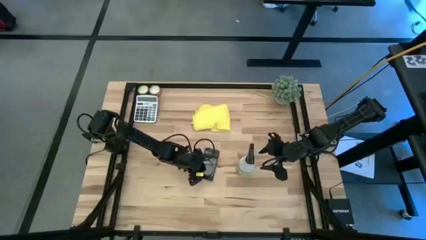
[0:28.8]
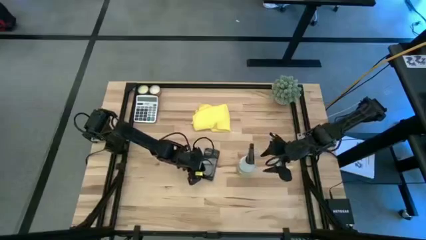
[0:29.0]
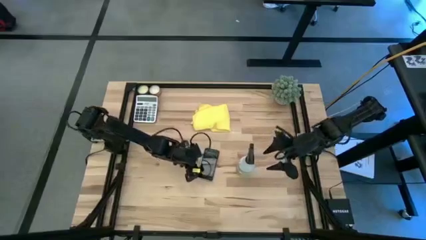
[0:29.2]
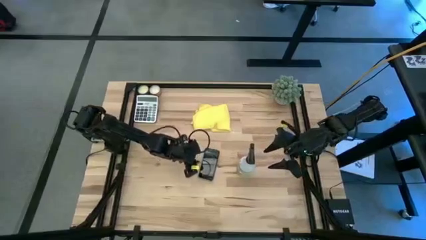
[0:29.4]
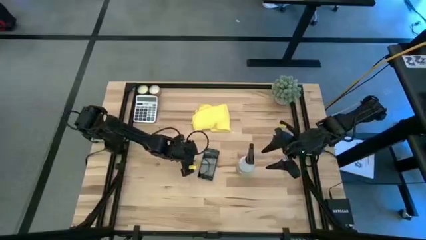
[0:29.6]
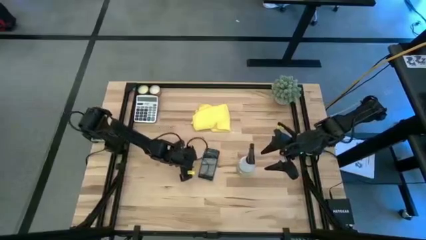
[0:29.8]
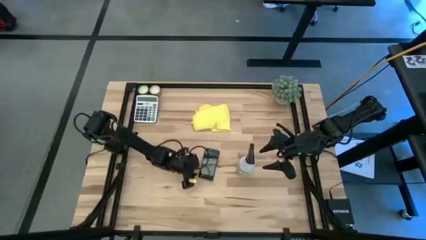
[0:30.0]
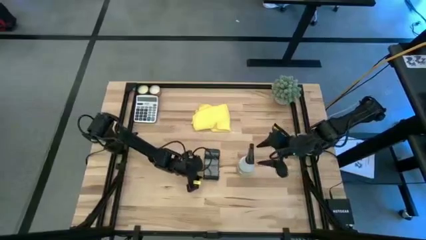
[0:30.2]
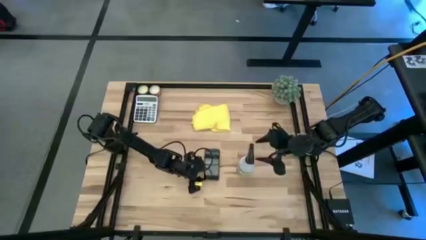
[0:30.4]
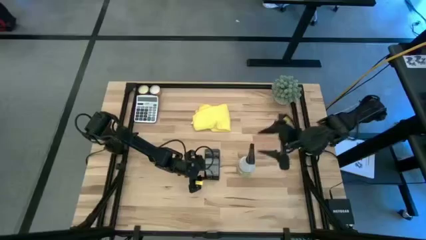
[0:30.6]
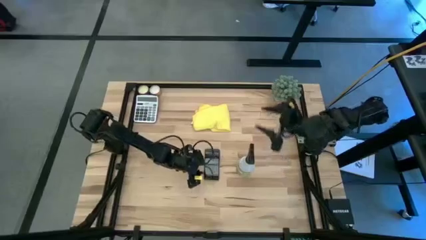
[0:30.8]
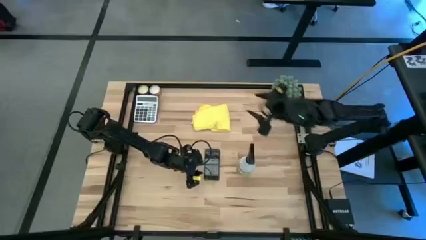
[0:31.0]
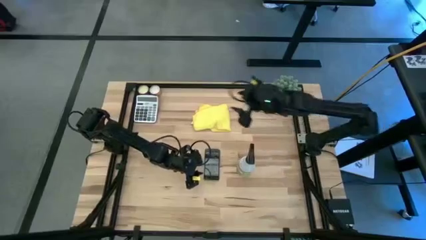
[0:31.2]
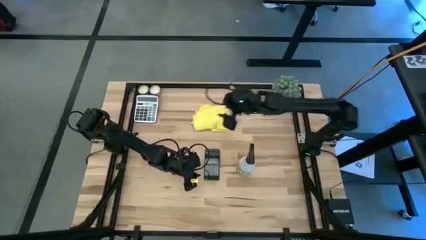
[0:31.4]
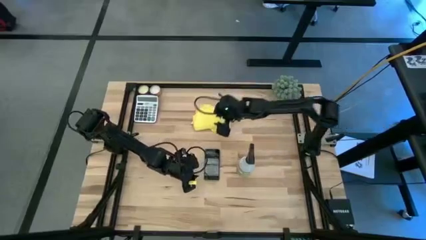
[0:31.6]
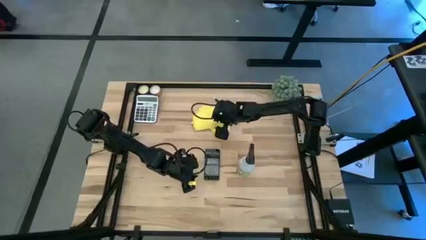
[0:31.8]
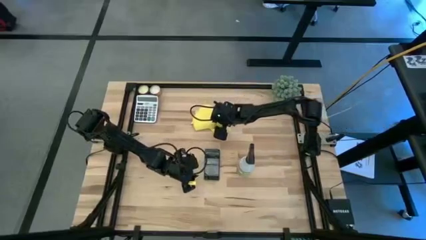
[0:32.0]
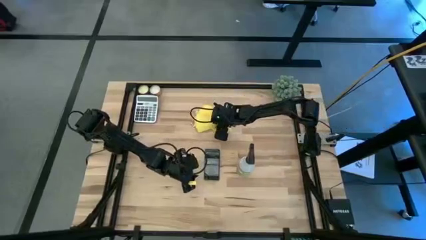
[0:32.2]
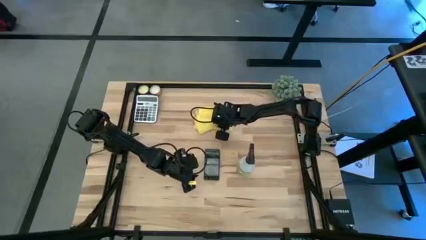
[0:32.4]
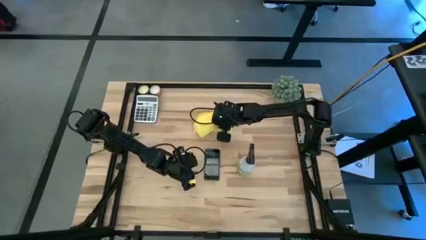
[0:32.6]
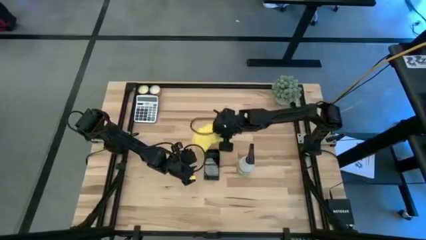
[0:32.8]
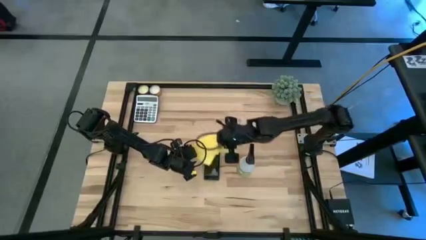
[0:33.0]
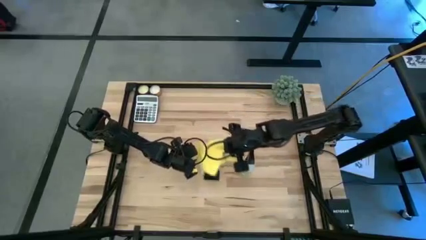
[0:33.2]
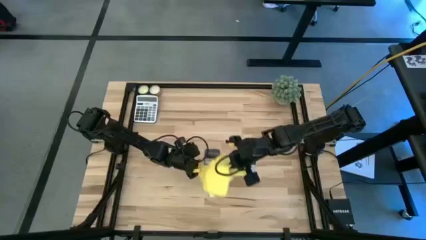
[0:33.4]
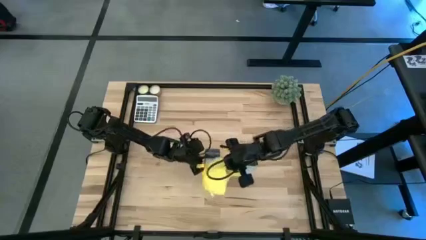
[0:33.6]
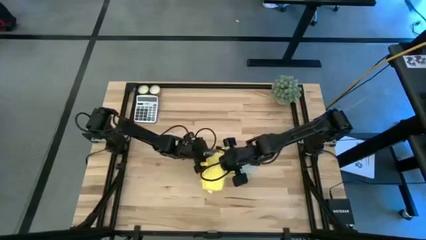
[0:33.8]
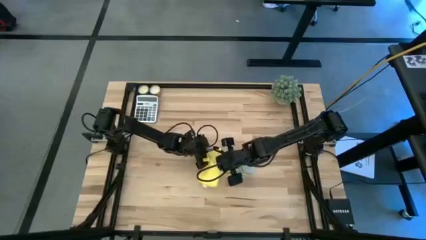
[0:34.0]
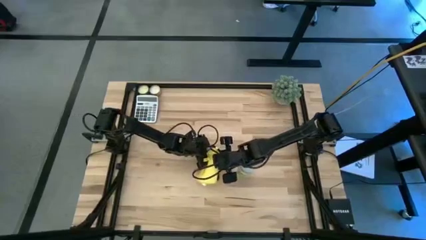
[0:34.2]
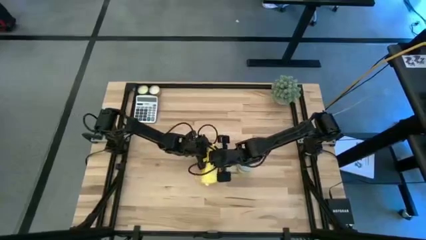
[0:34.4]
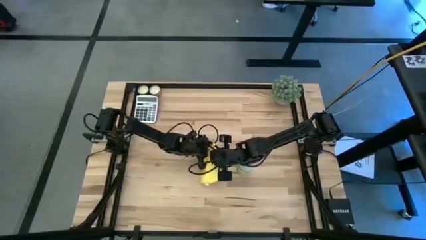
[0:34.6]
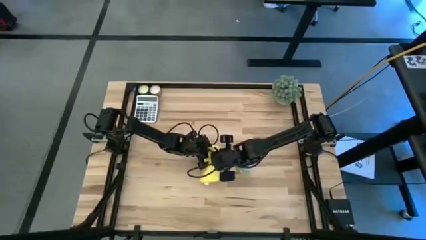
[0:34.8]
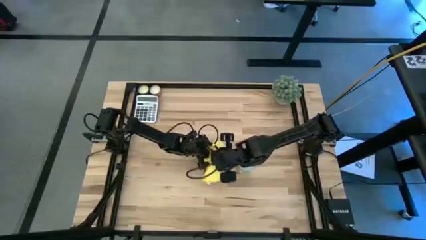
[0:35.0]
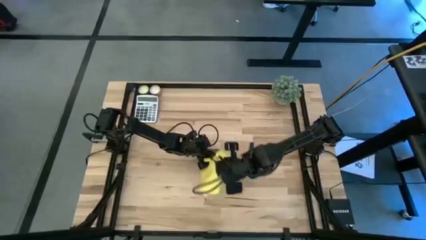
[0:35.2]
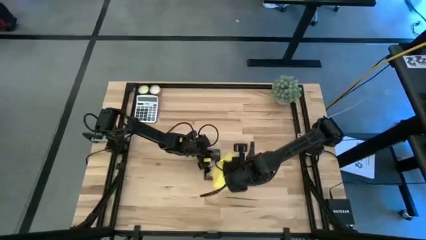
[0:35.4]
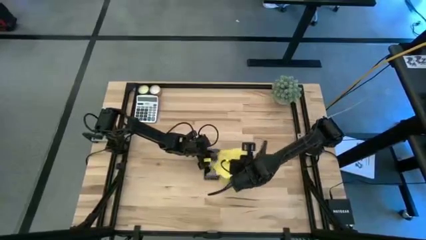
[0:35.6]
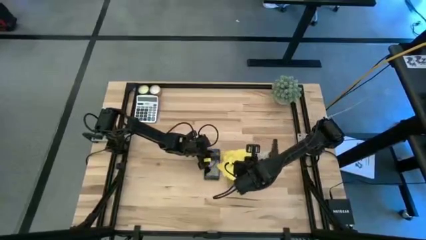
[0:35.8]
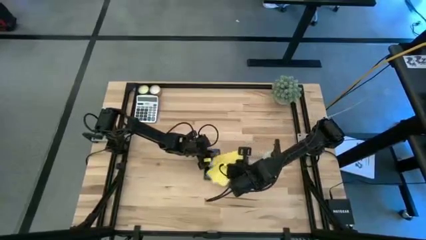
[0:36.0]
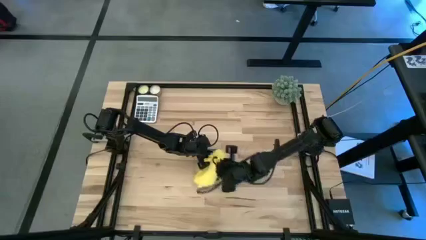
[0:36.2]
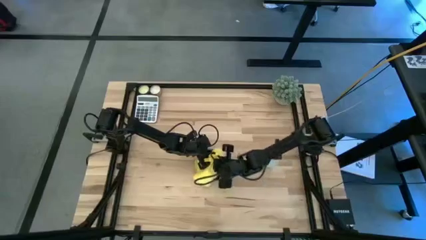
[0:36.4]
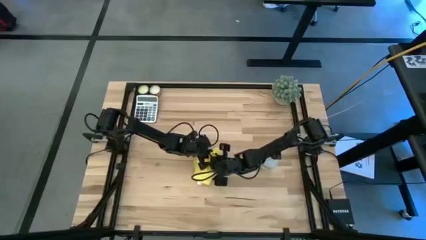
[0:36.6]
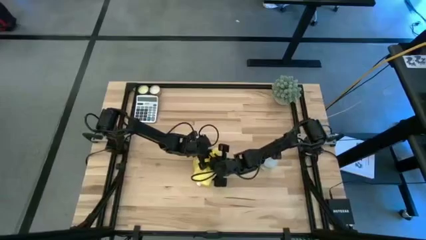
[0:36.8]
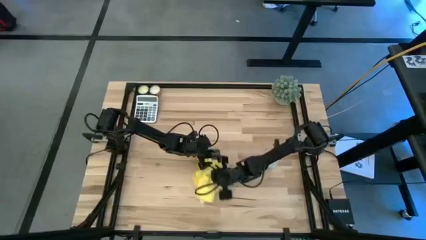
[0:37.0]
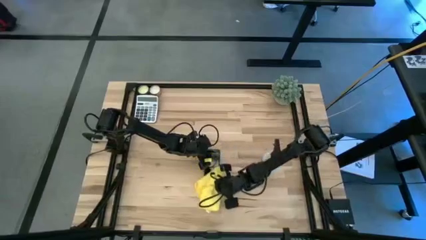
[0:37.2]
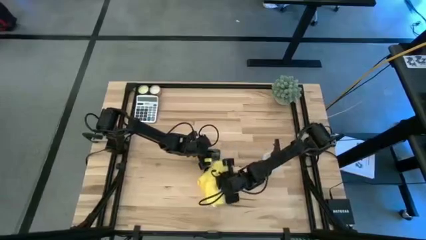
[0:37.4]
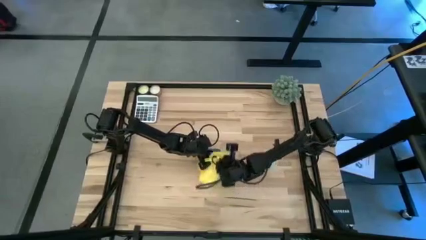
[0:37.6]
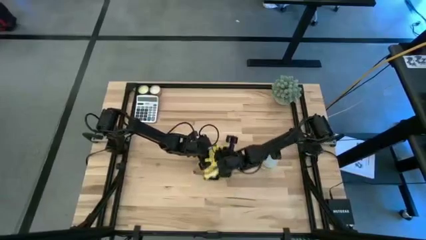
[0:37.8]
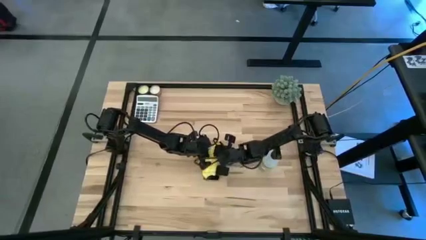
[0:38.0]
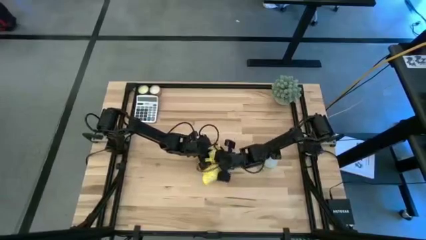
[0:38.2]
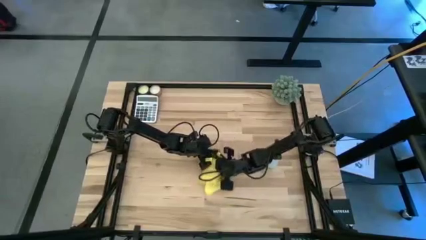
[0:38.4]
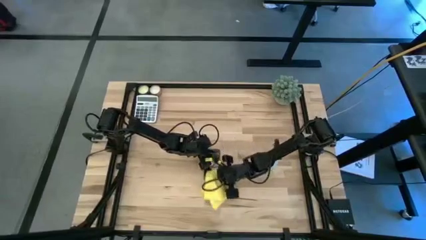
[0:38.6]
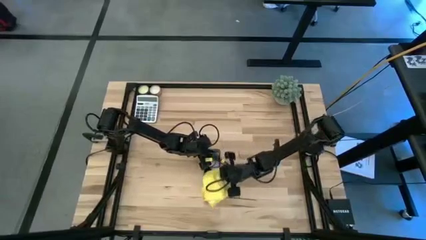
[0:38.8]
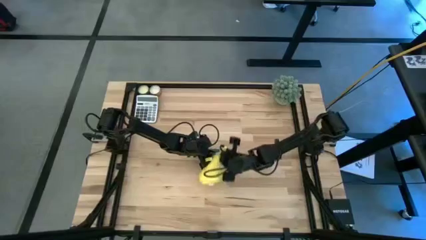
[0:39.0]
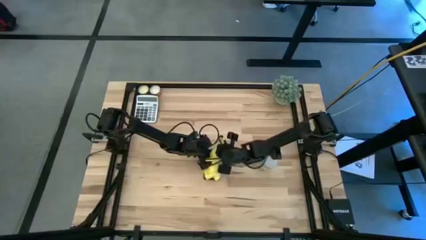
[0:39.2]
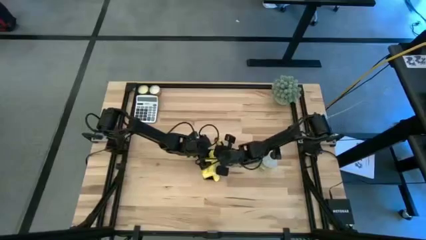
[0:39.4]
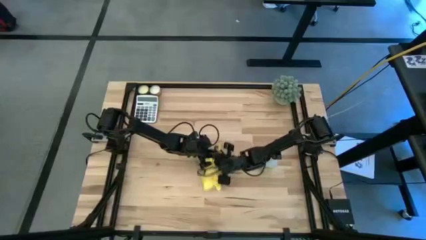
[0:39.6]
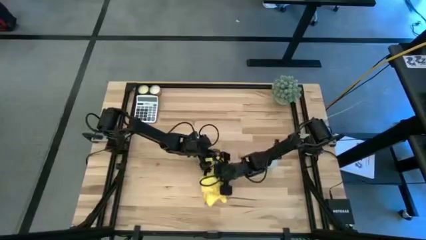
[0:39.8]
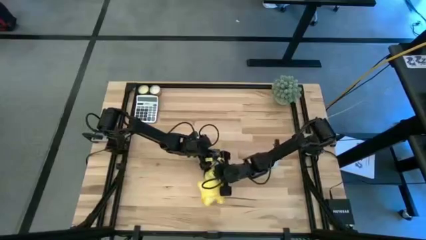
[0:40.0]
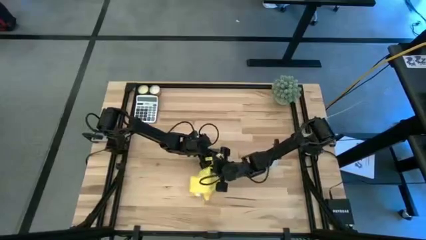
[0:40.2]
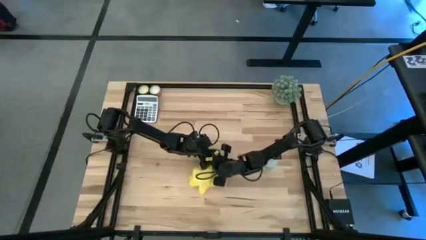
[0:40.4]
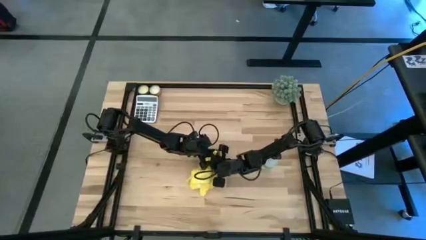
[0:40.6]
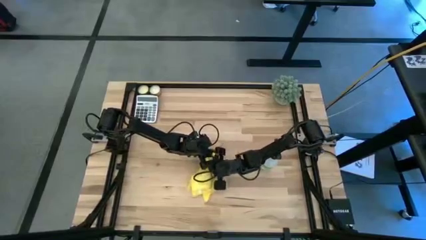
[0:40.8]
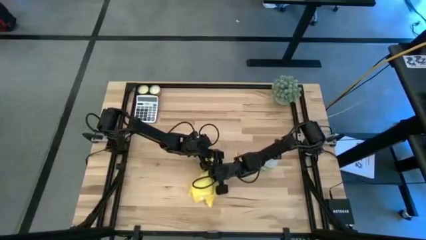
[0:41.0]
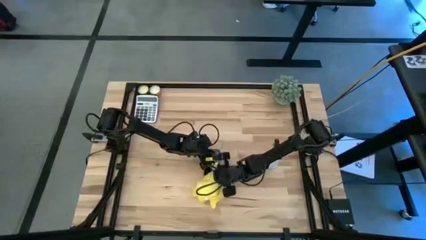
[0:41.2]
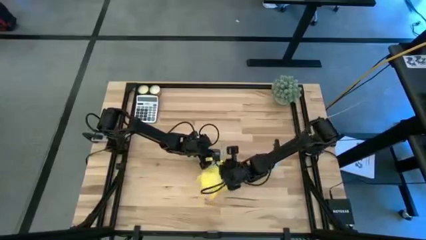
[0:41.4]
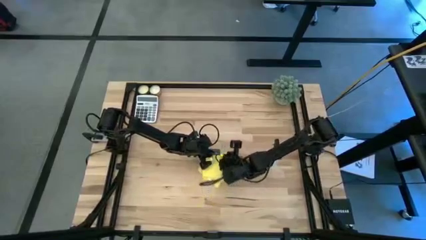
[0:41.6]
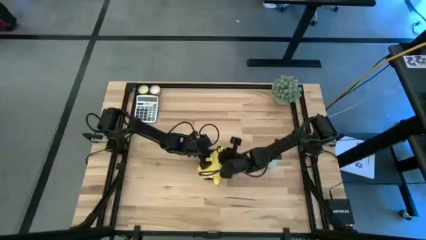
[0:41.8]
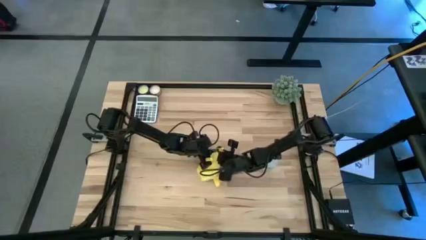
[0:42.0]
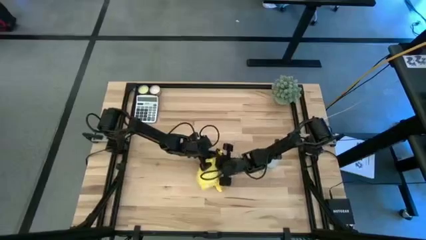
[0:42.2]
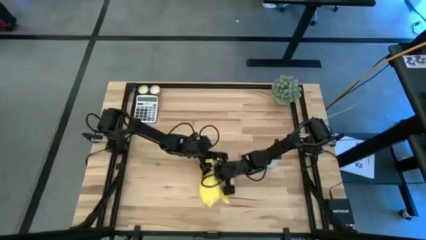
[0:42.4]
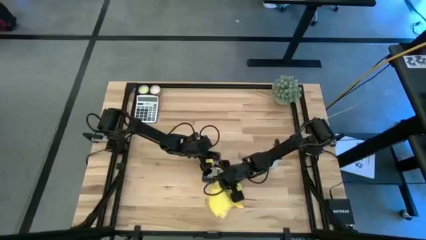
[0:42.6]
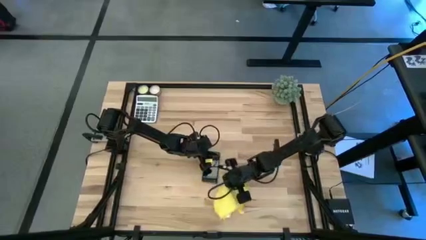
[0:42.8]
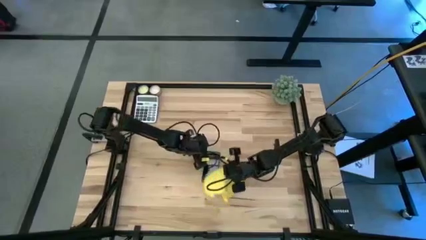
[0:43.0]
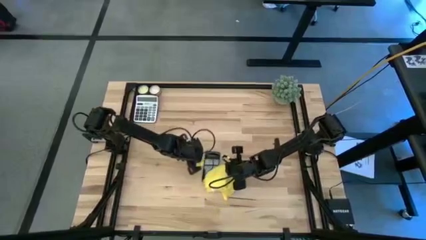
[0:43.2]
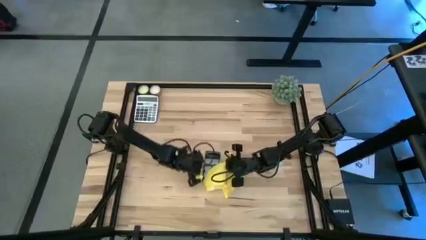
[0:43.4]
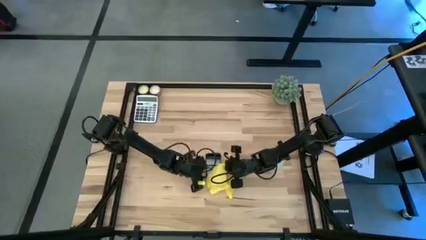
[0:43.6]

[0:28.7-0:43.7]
Task: Apply microfiber cloth
Wipe the front of the black cellphone with a yellow microfiber towel
